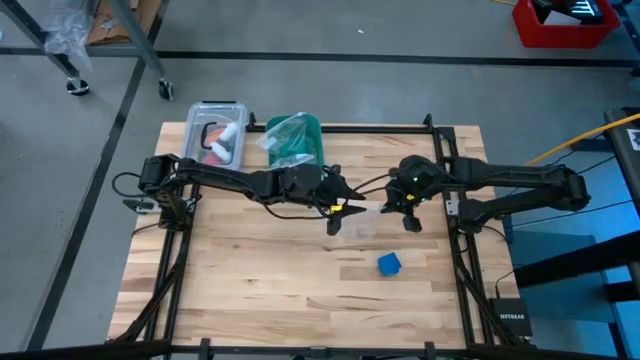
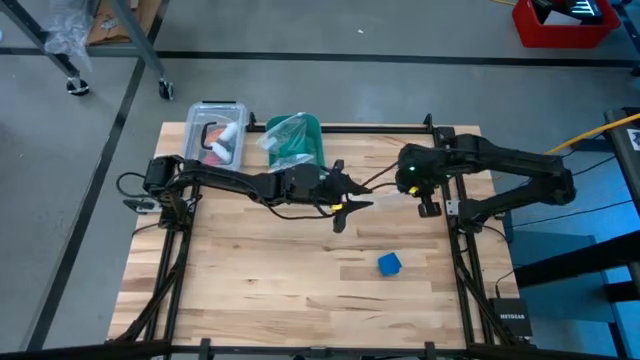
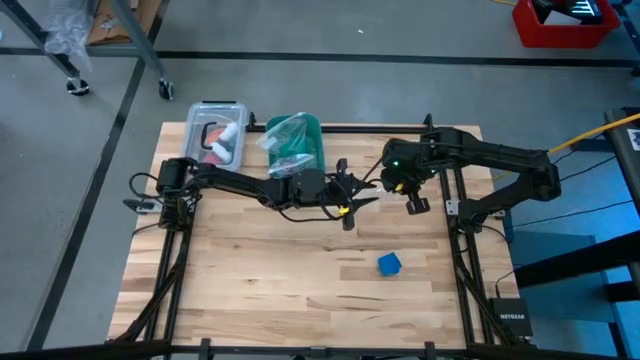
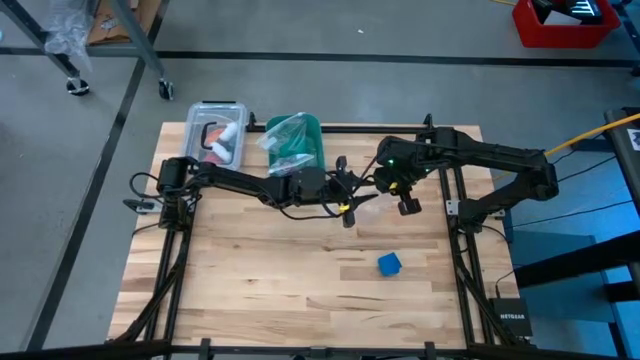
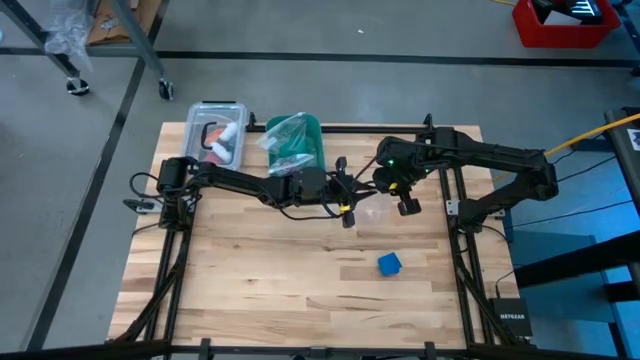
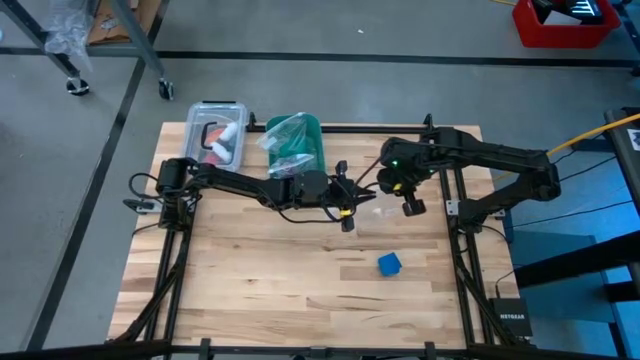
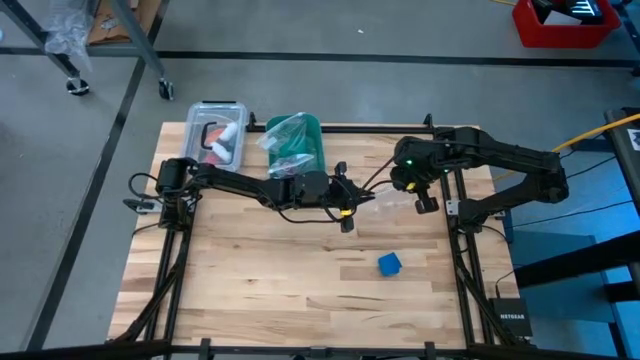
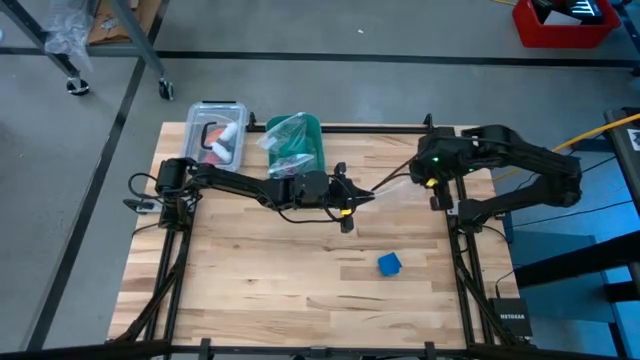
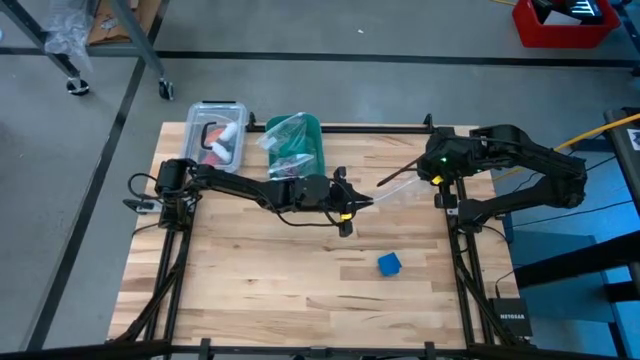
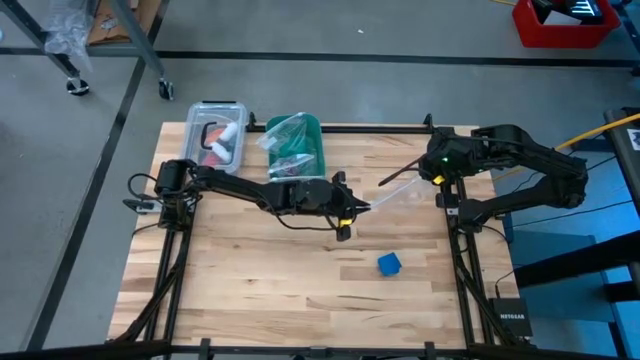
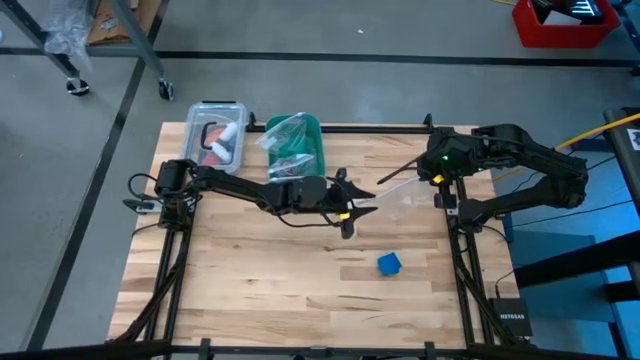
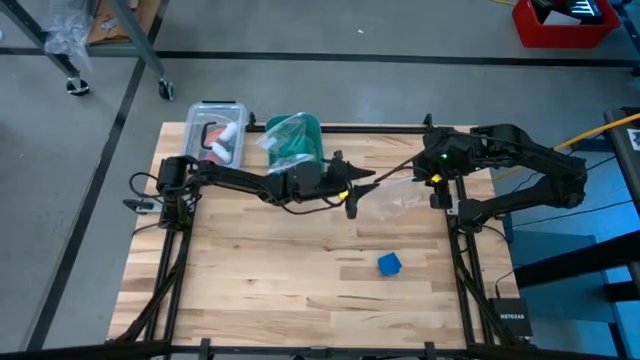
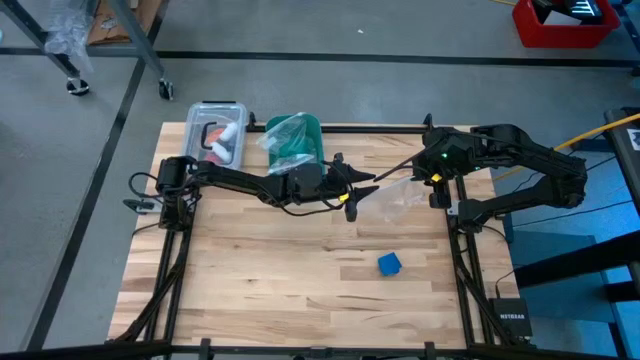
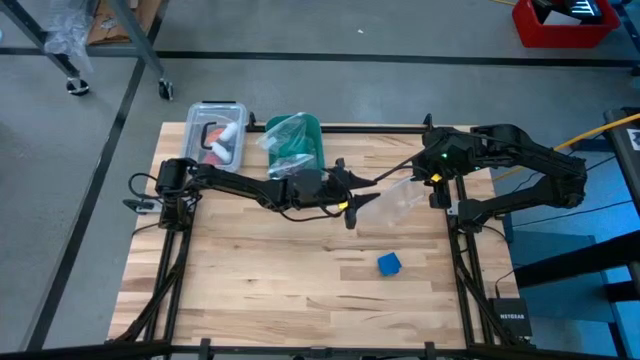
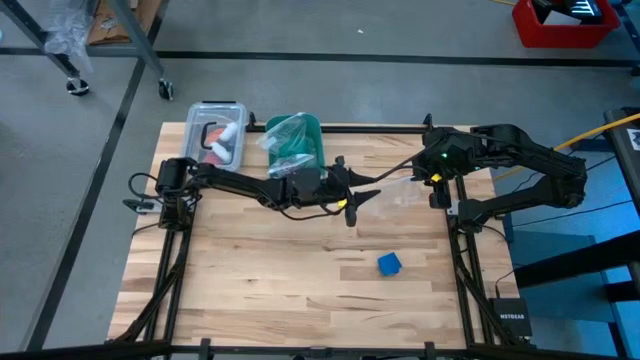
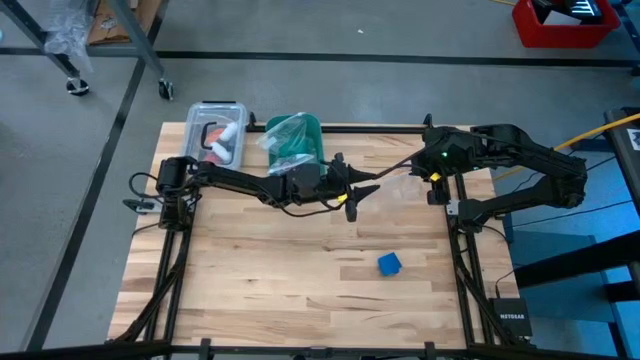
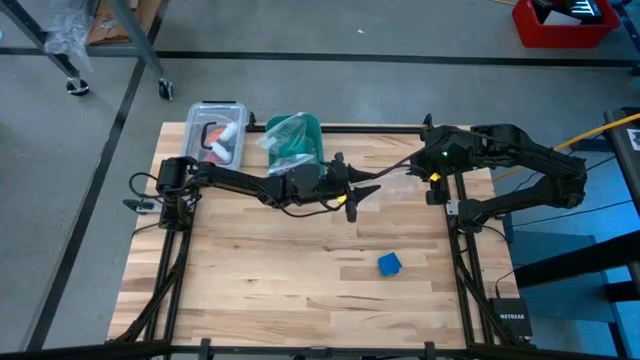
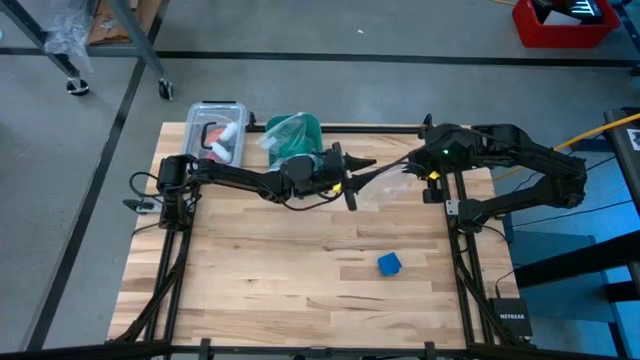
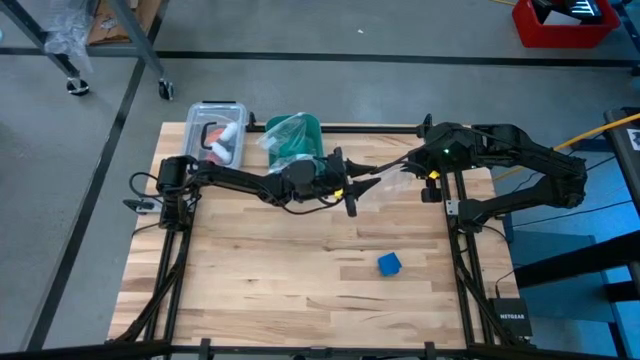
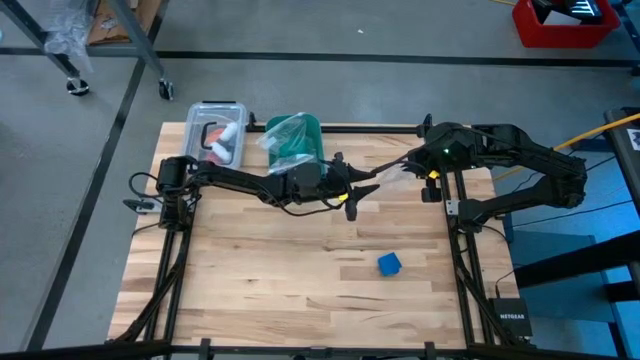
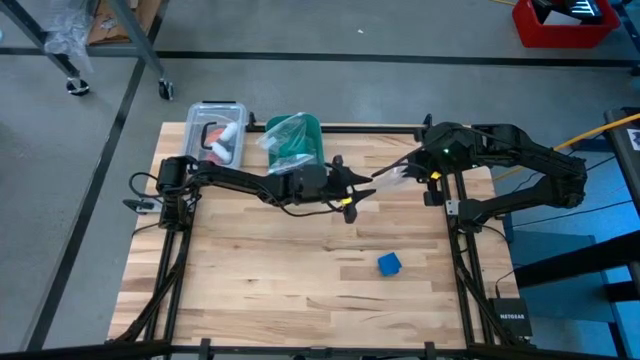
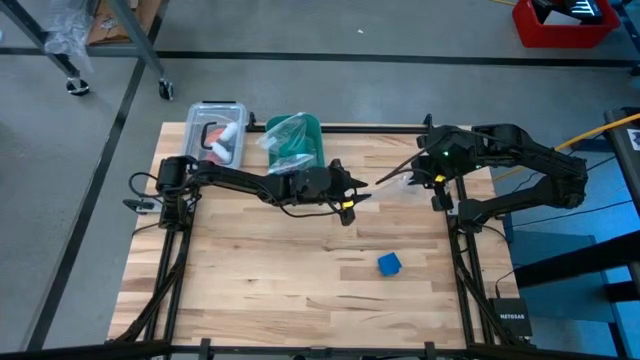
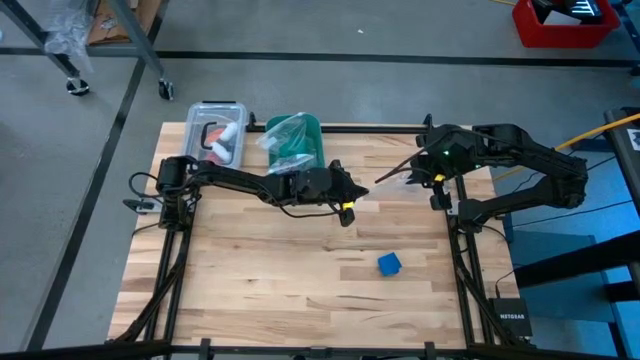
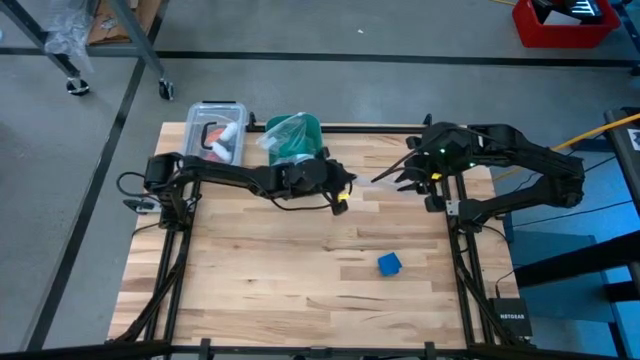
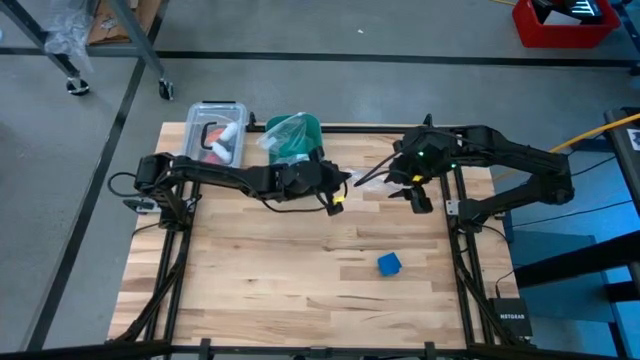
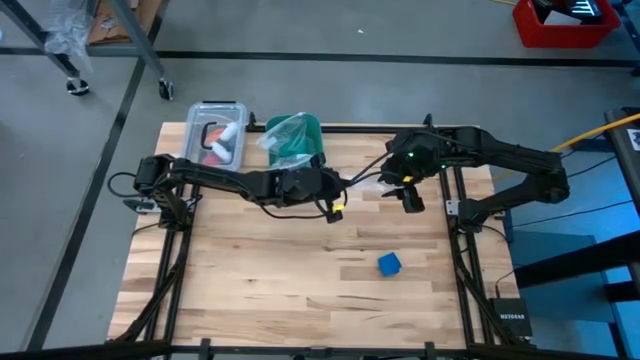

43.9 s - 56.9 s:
Task: Roll bandage
Open the transparent zip bag

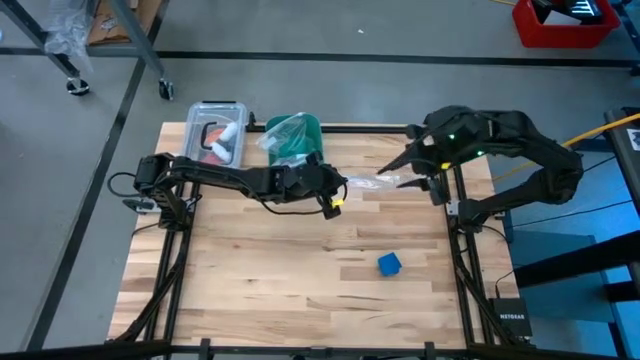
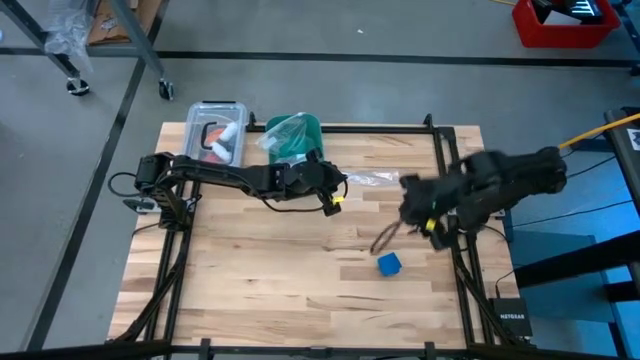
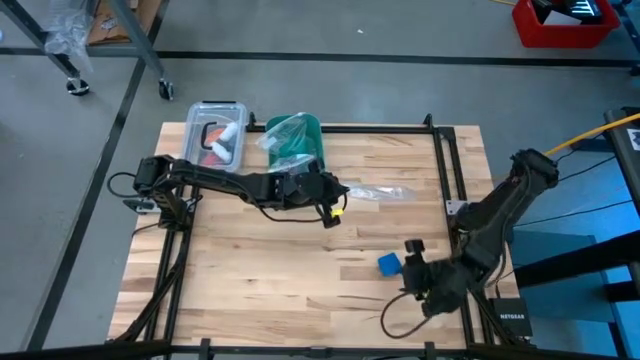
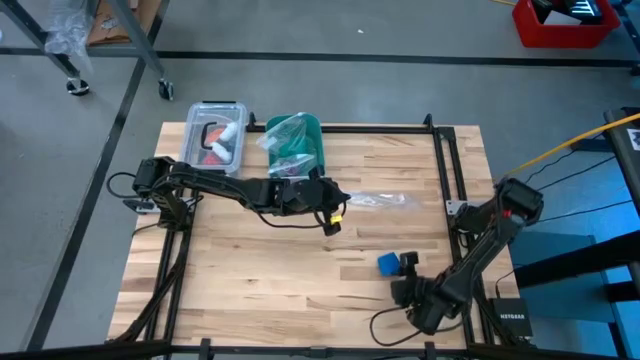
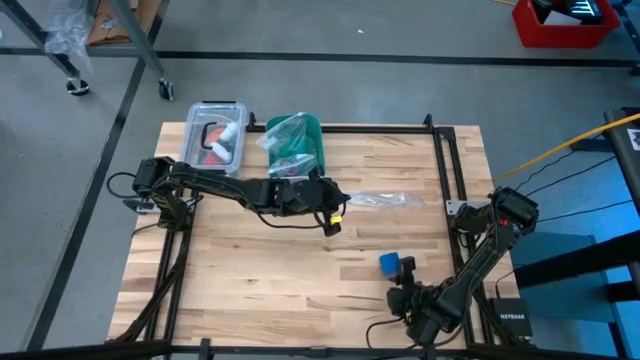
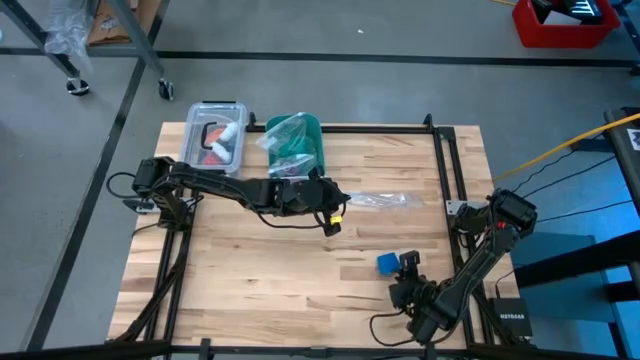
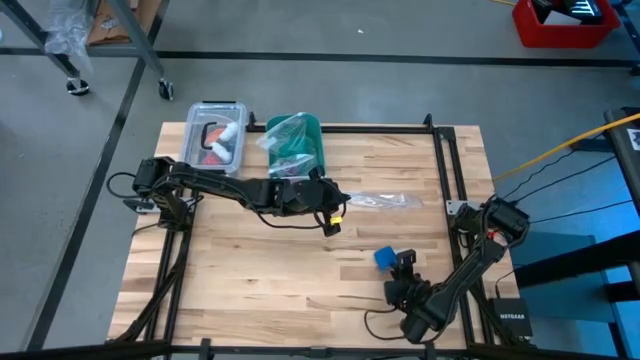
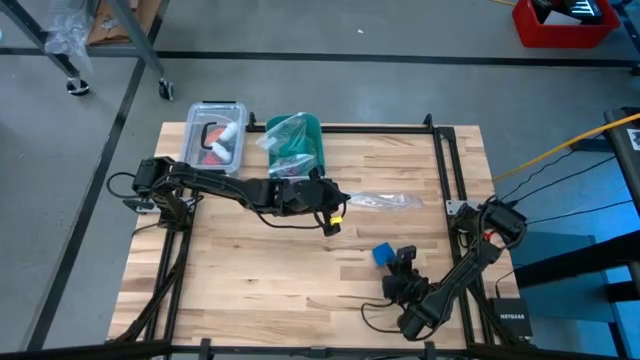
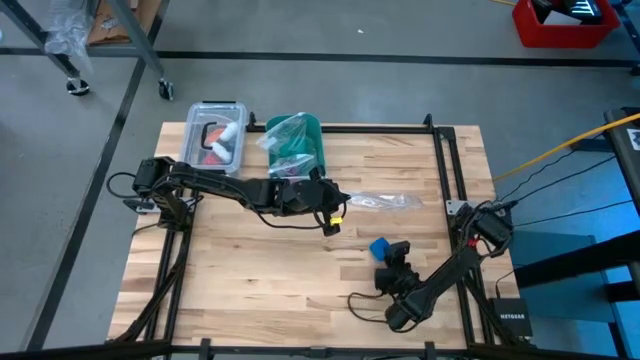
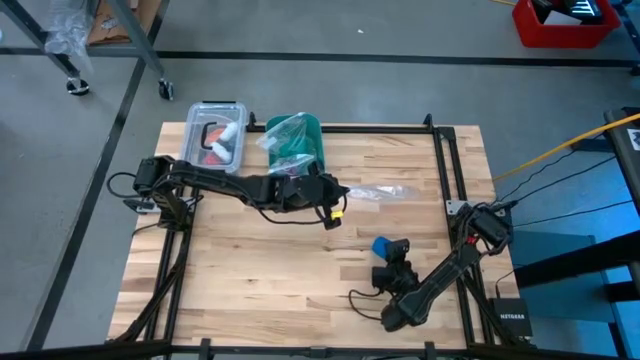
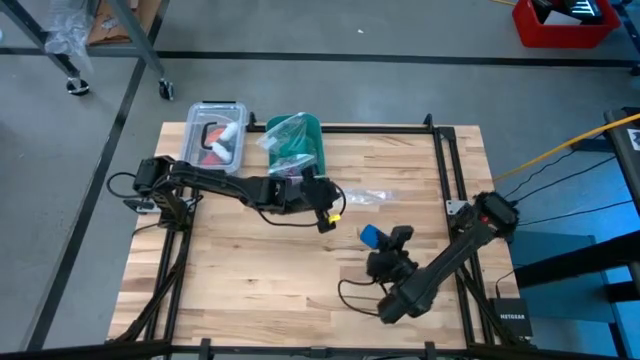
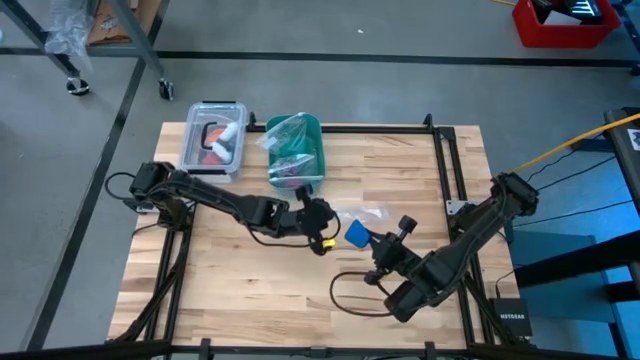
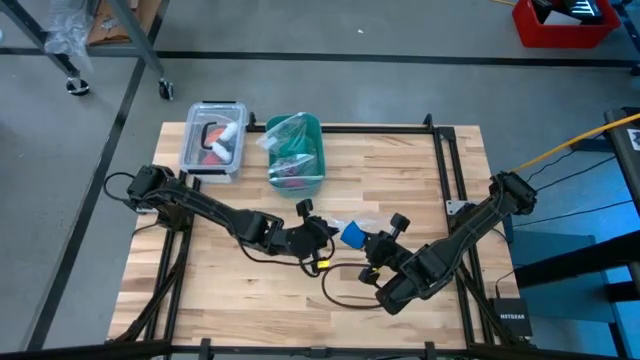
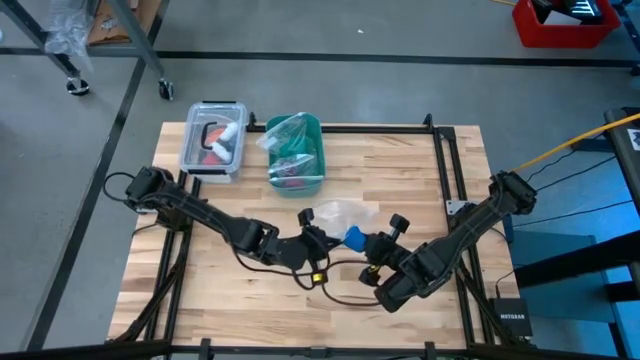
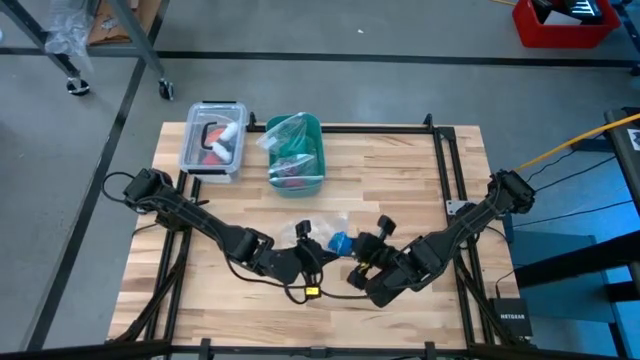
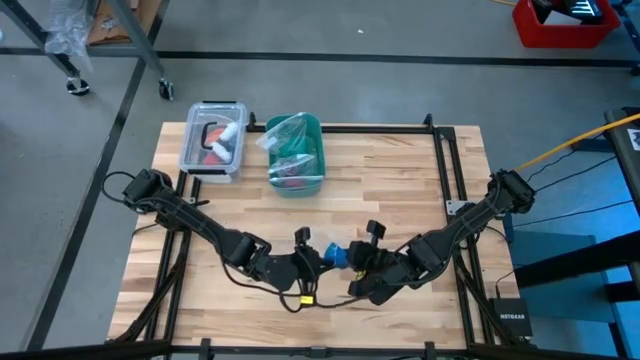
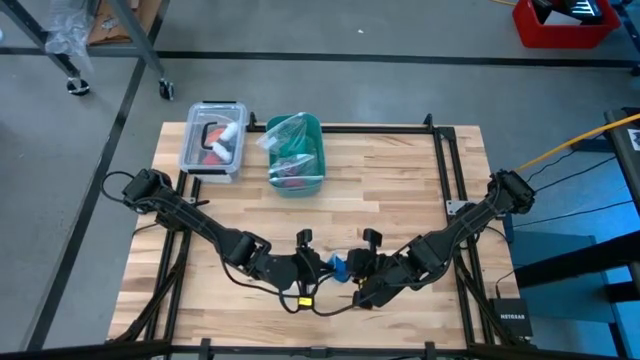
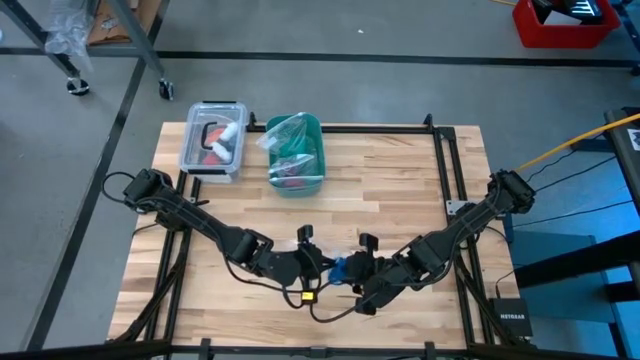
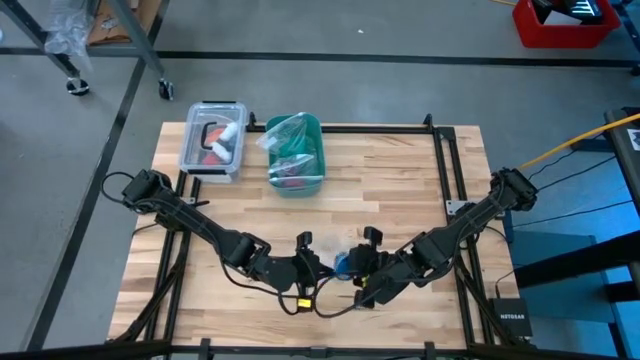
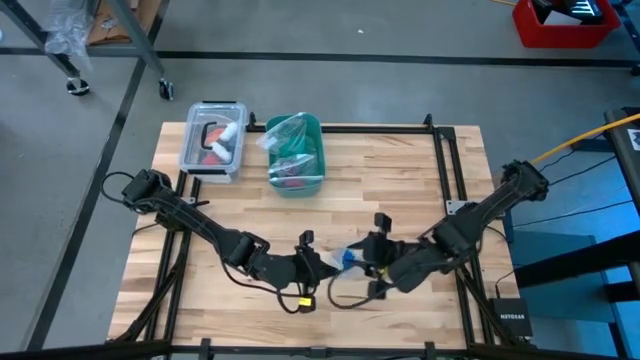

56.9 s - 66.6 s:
Put the blue bandage into the transparent zip bag
